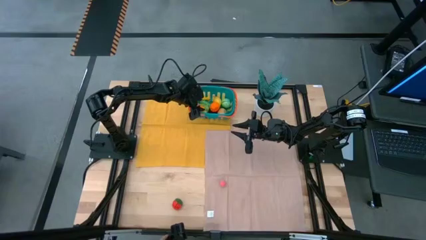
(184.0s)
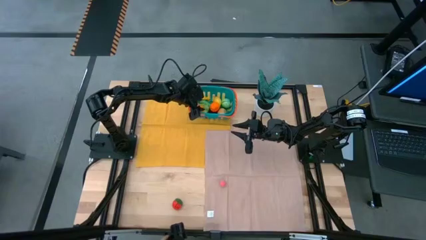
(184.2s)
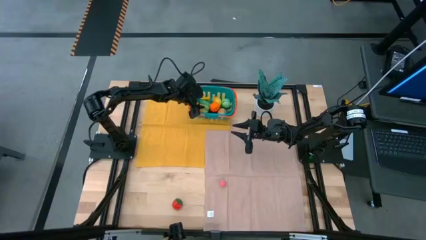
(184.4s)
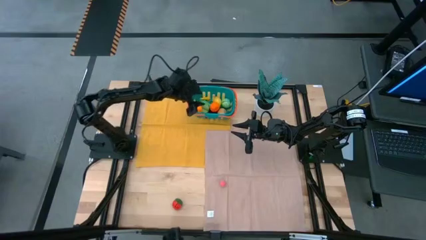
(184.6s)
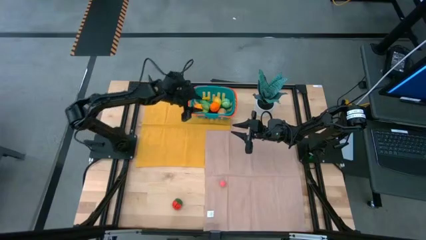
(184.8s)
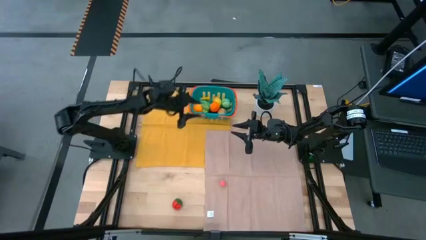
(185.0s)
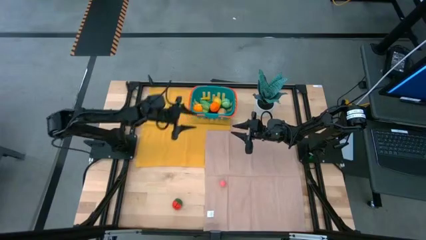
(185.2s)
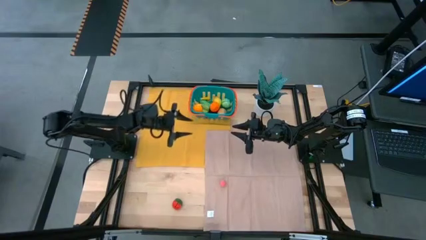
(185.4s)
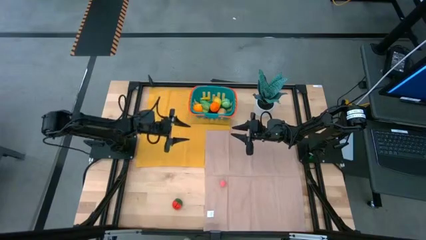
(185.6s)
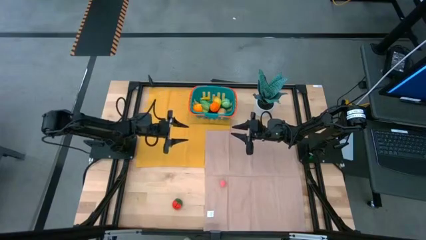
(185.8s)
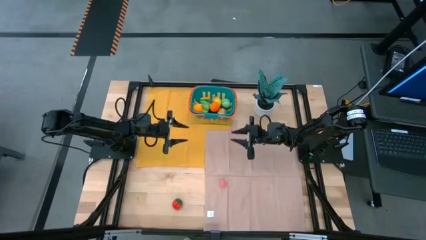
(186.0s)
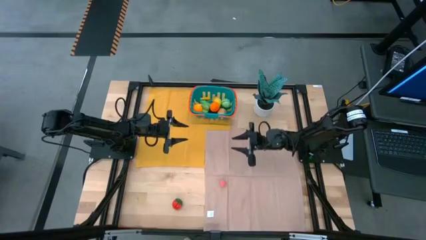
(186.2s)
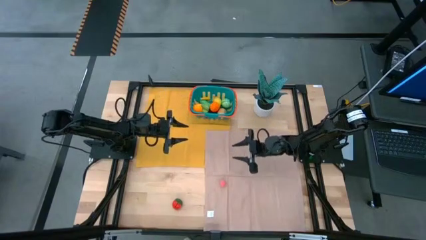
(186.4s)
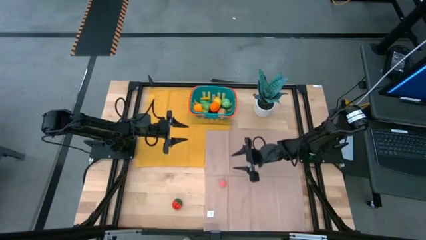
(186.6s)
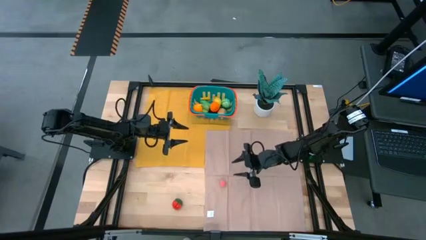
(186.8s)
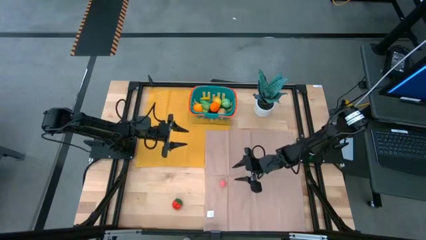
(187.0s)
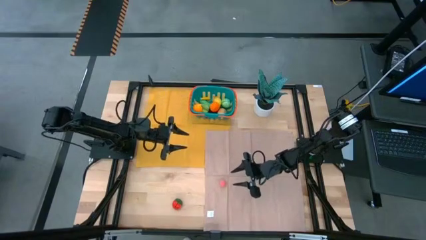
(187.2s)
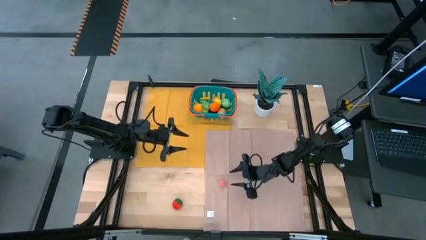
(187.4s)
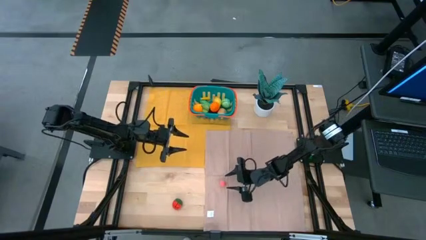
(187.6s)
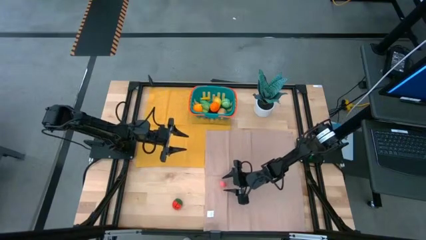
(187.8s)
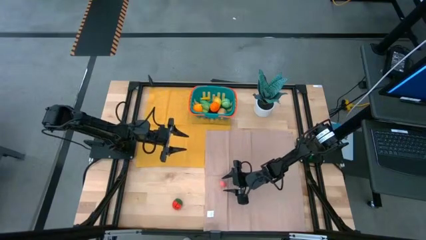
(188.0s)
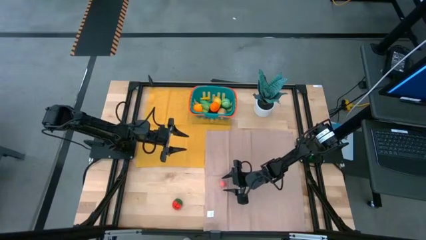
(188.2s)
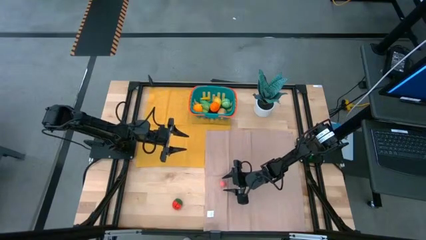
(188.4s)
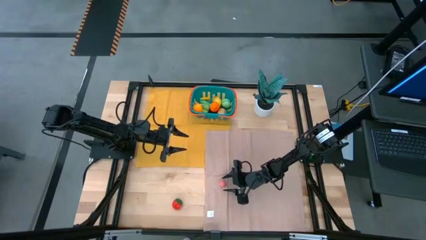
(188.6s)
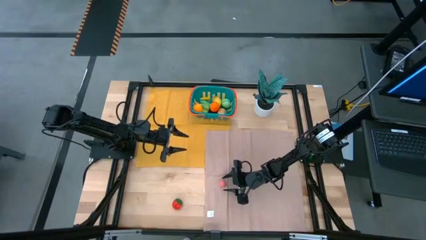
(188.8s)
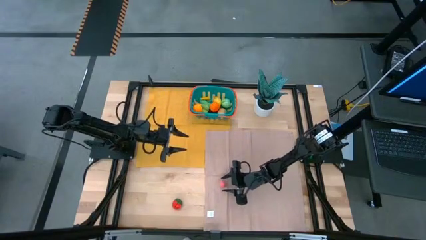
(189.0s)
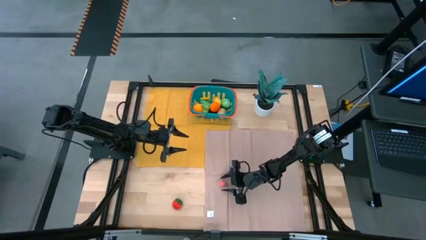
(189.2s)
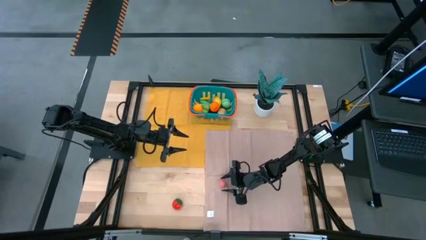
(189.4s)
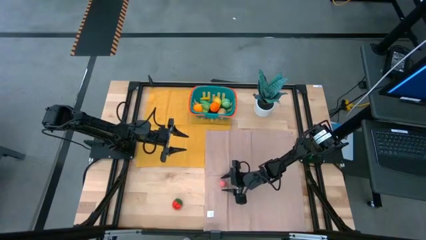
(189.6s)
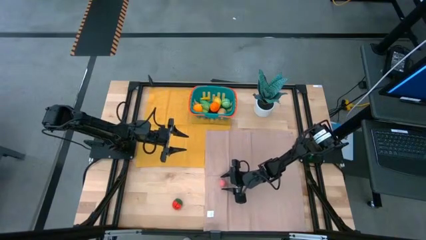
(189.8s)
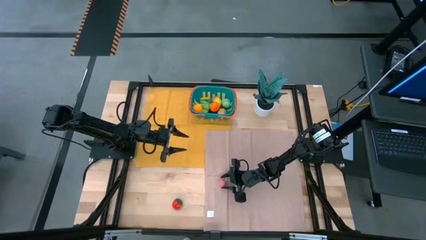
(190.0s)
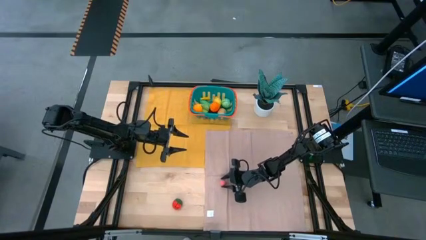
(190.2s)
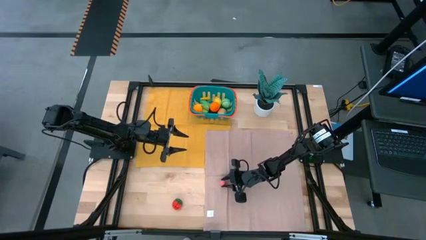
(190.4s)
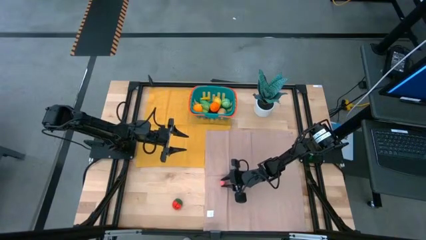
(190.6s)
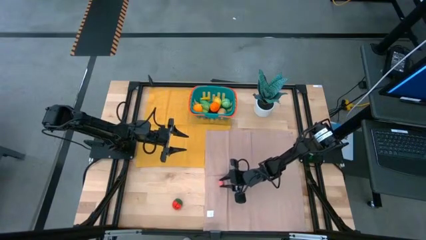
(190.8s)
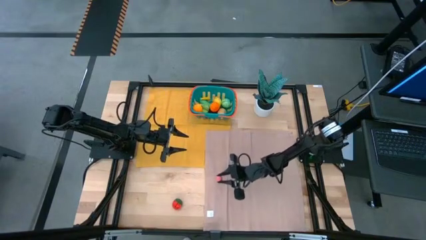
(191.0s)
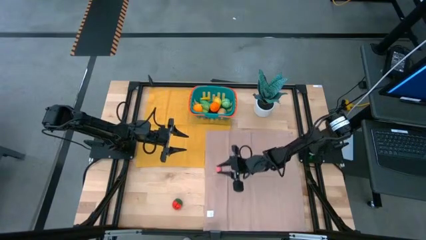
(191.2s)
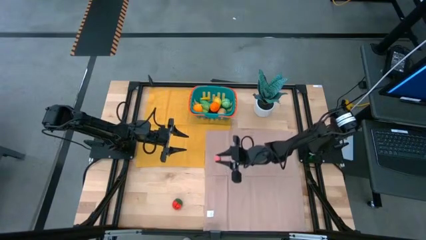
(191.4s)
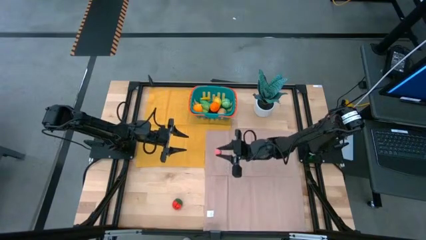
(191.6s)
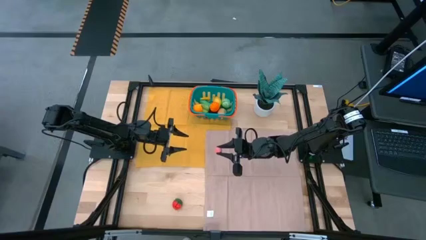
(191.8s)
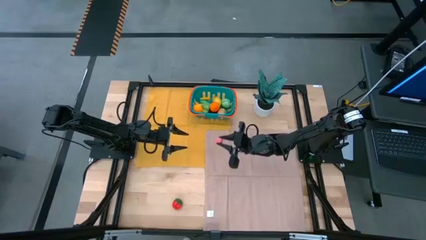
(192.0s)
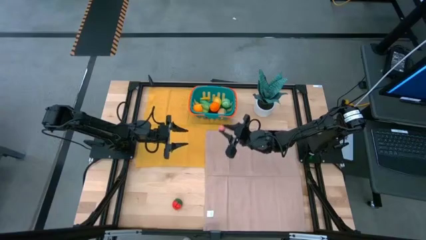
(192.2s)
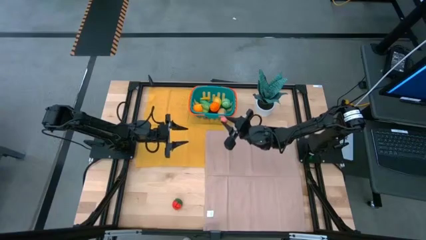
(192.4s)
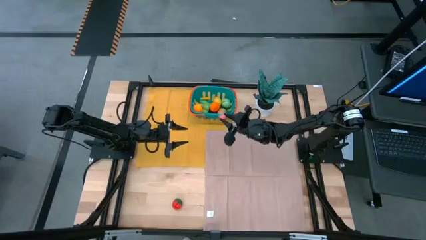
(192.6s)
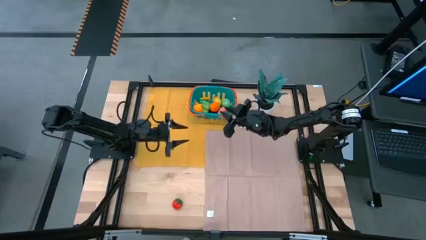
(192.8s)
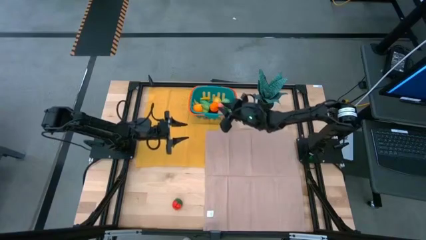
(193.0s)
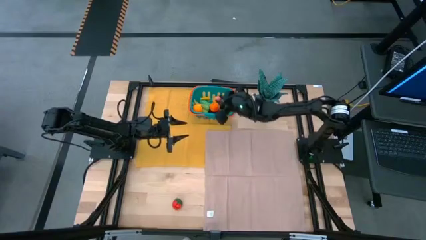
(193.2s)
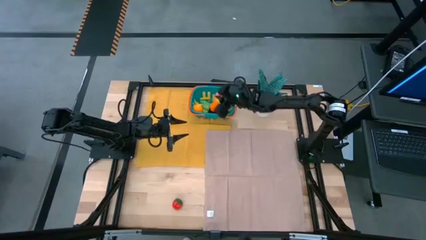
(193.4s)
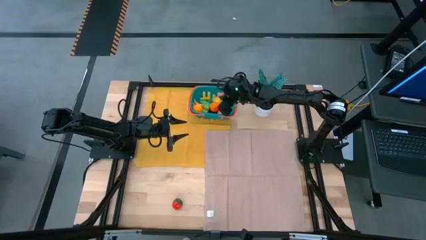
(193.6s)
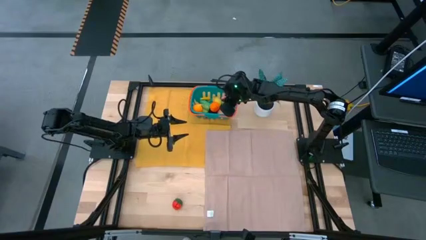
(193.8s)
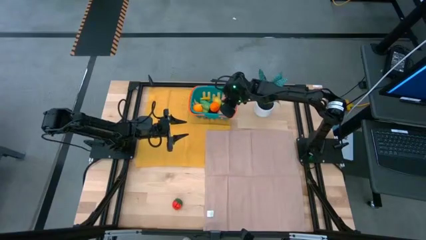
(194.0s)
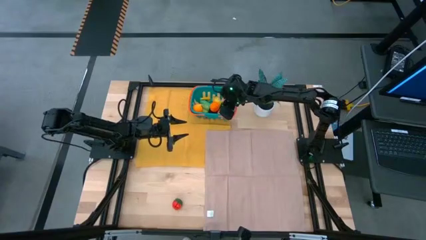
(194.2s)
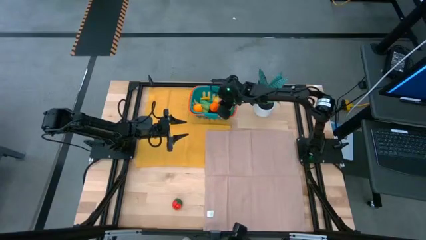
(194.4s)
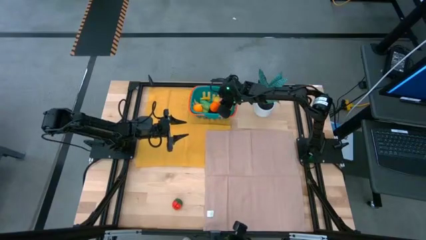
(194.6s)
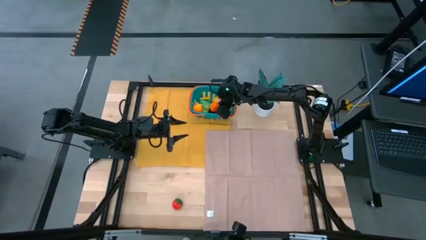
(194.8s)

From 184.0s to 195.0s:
Task: Pick and placing Produce into tupperware
Put the pink peach into the blue basket

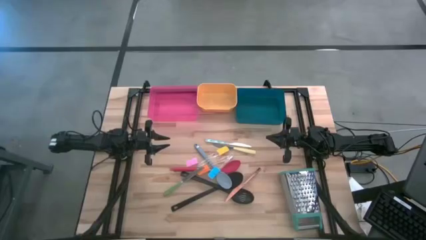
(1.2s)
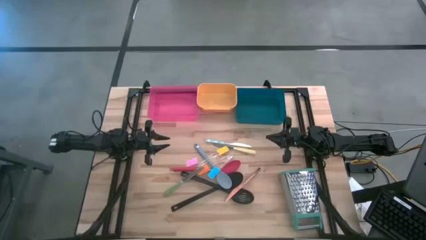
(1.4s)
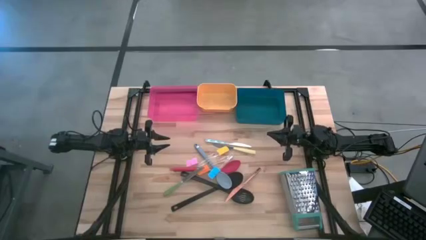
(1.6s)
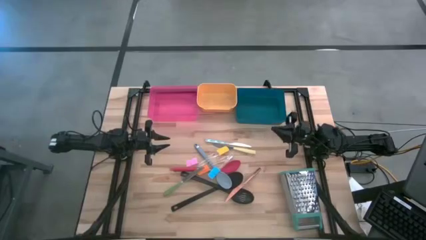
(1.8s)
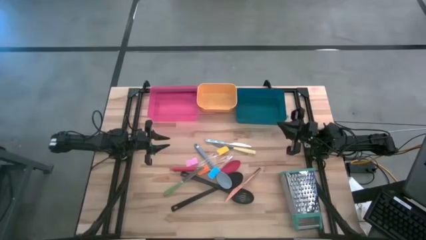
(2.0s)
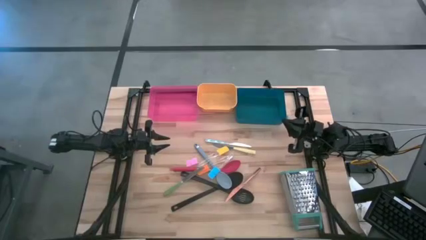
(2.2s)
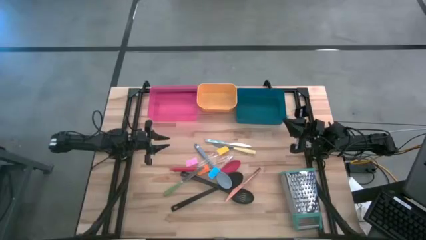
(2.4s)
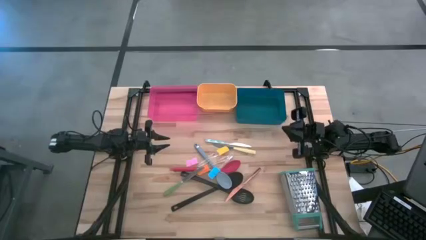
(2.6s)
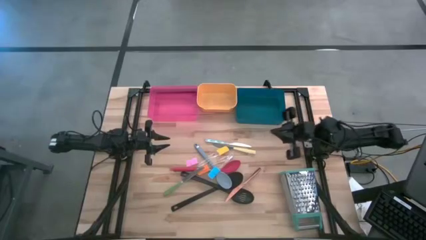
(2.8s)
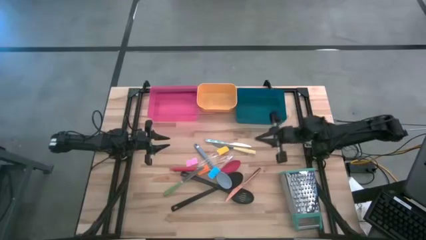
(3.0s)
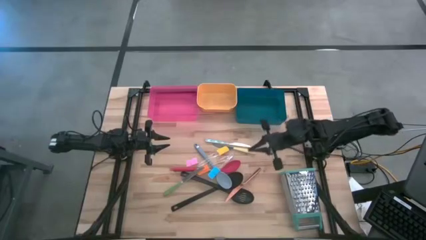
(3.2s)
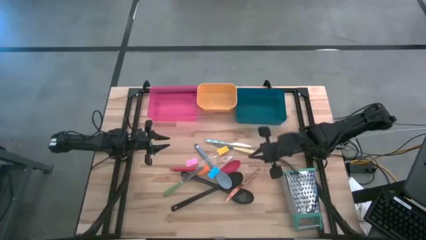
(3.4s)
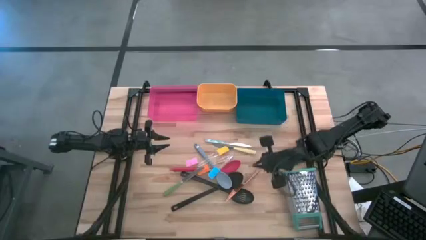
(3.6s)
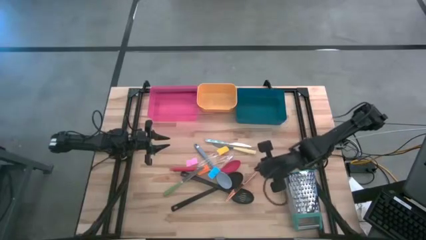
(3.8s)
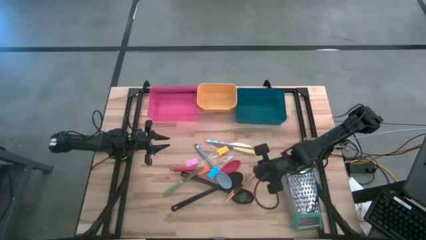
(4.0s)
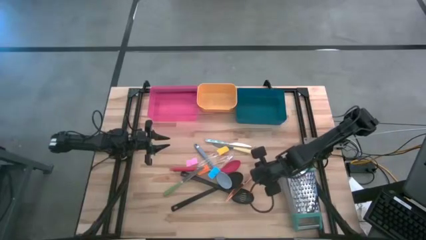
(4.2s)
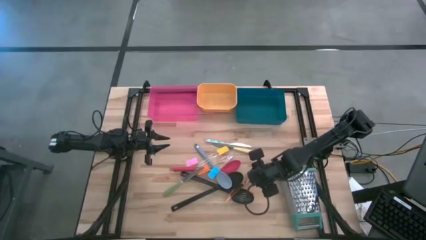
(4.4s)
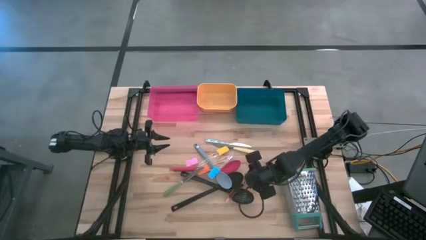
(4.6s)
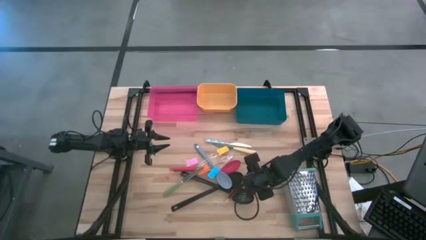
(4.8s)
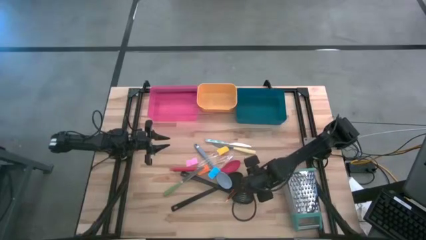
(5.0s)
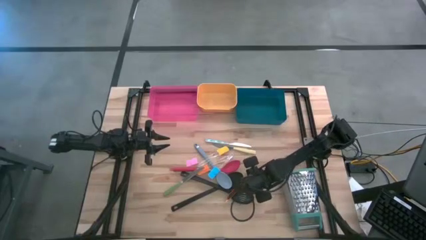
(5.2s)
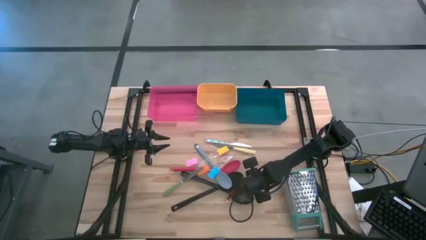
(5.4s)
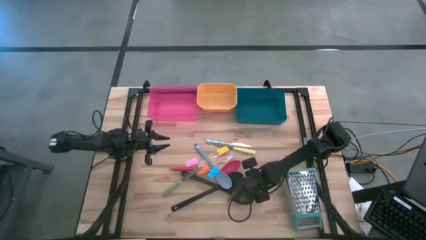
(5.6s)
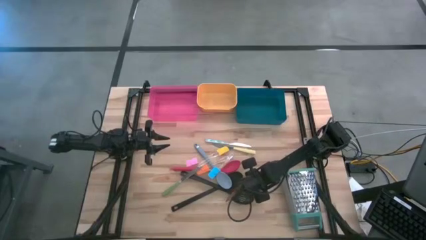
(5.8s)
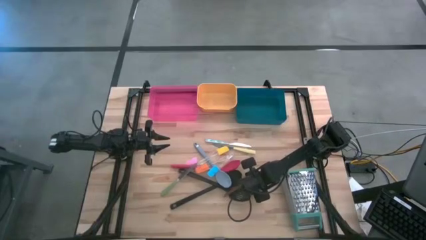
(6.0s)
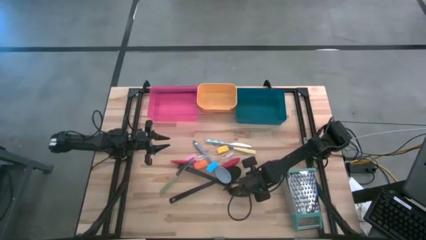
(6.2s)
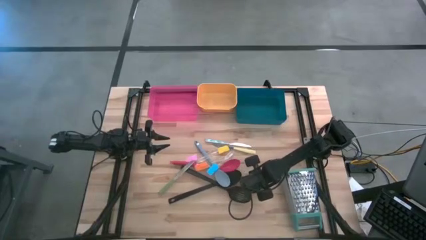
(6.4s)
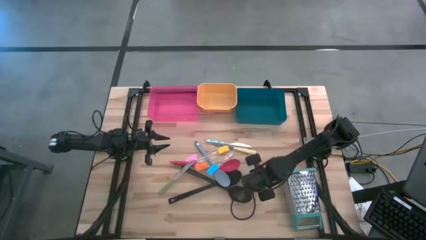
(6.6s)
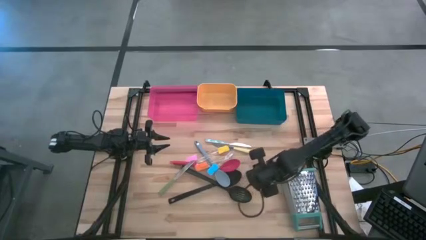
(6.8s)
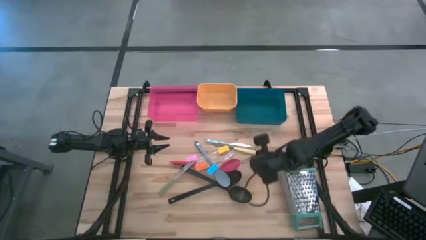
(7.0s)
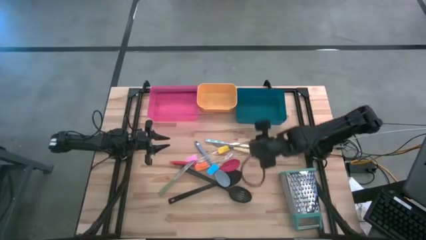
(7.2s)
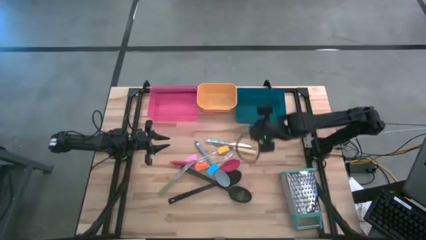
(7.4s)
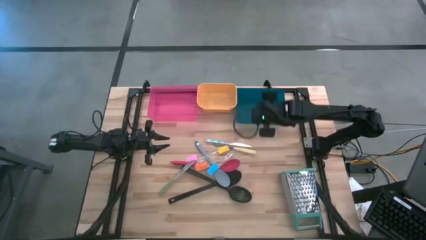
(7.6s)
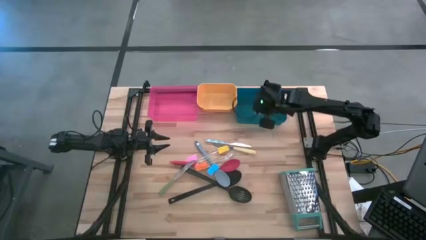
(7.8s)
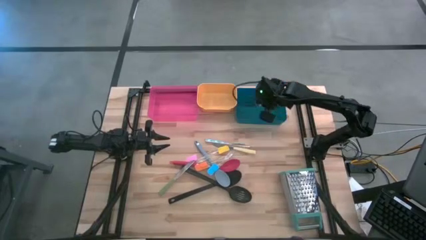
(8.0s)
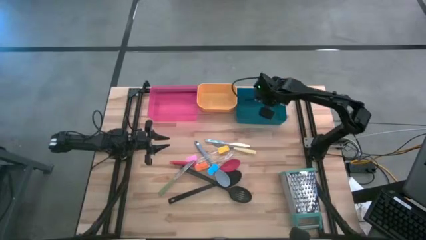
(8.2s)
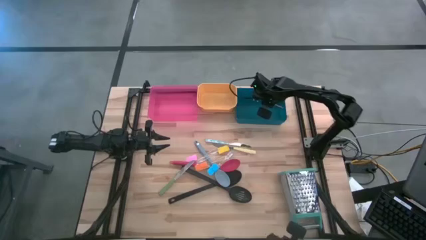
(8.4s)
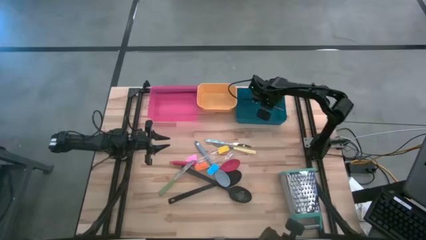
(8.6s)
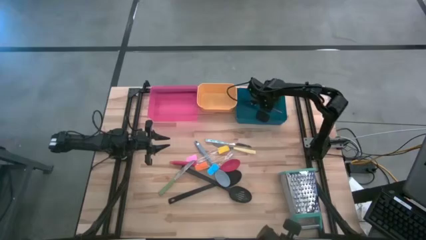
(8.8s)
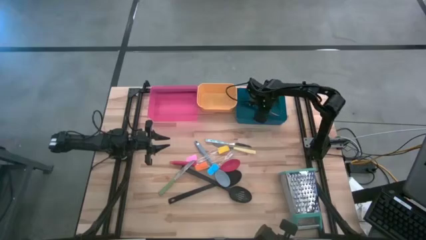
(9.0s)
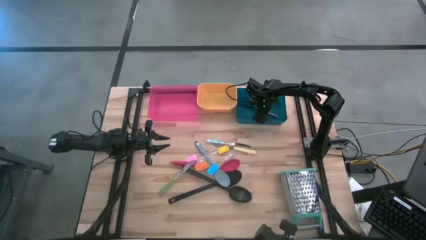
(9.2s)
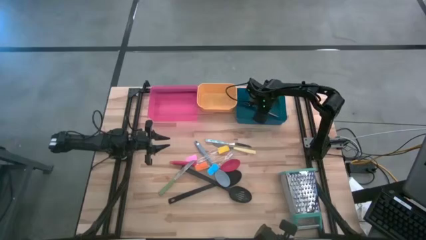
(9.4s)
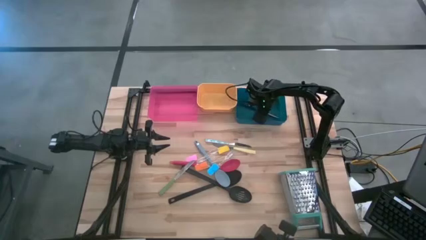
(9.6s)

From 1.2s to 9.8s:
Task: Pick & Place Kitchen Items
Put the gold knife into the blue bin
